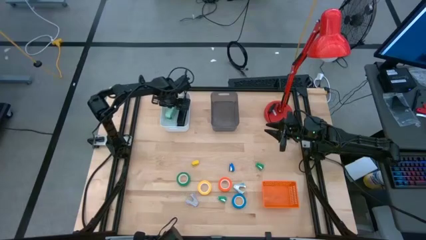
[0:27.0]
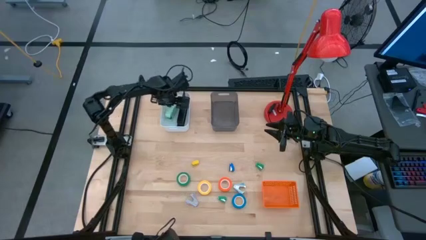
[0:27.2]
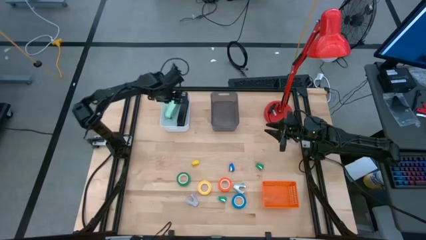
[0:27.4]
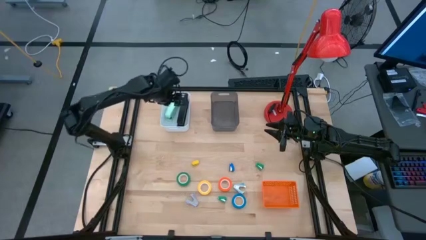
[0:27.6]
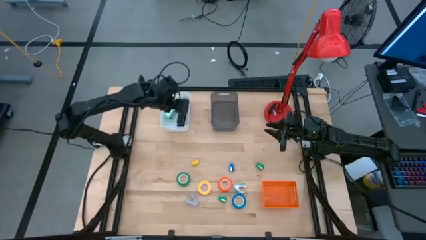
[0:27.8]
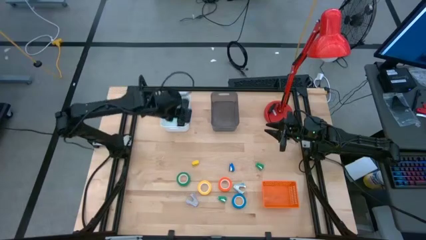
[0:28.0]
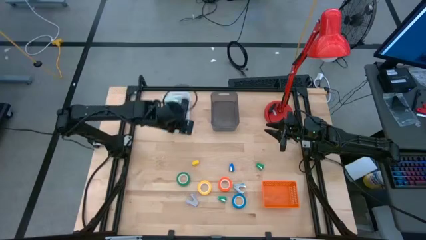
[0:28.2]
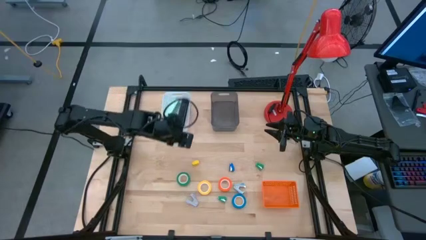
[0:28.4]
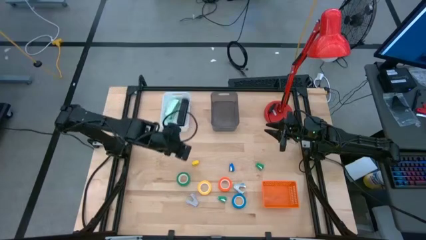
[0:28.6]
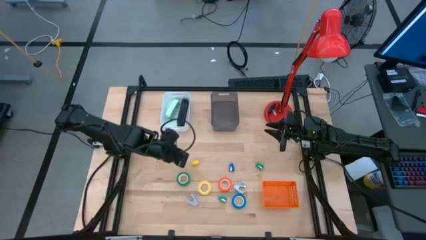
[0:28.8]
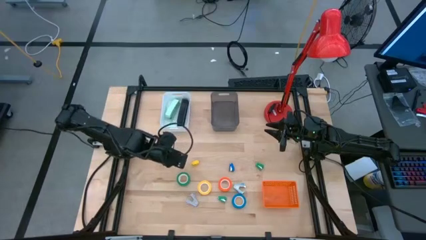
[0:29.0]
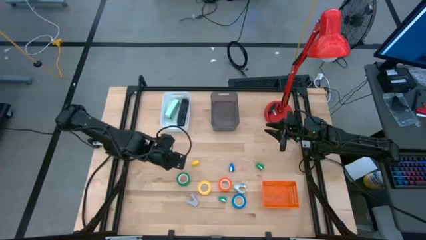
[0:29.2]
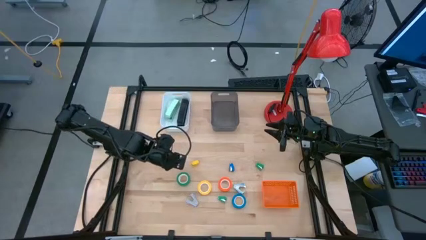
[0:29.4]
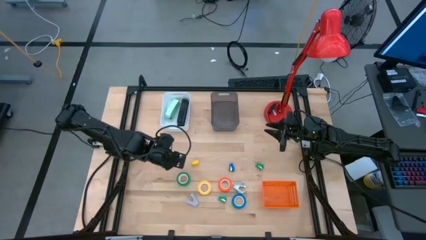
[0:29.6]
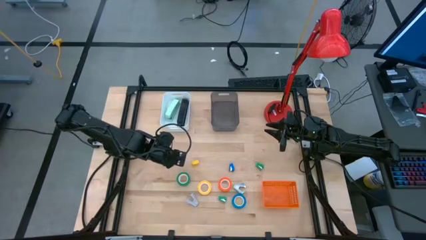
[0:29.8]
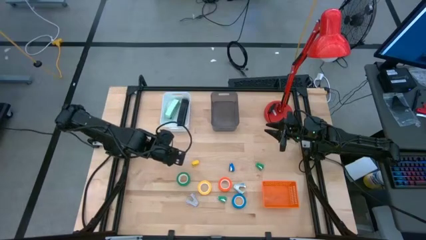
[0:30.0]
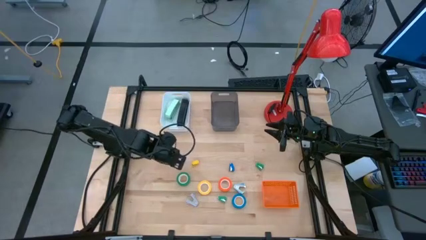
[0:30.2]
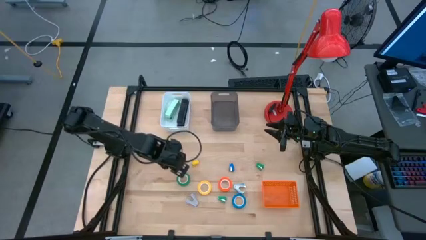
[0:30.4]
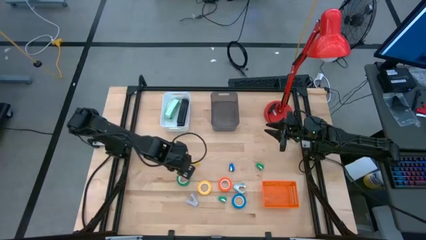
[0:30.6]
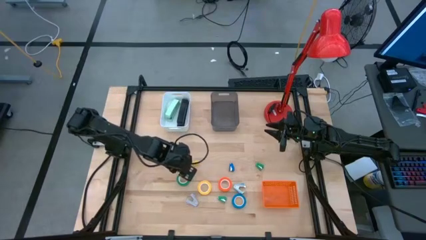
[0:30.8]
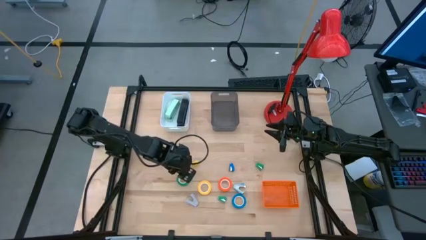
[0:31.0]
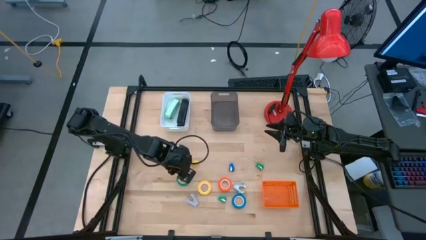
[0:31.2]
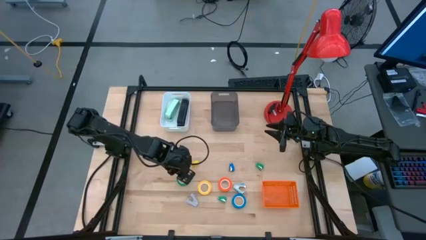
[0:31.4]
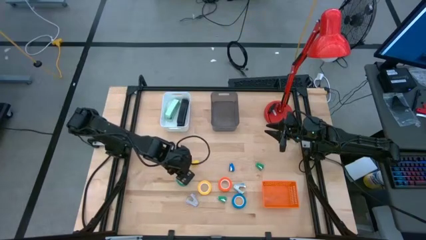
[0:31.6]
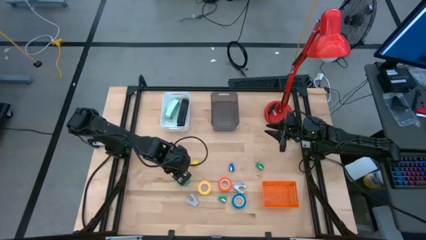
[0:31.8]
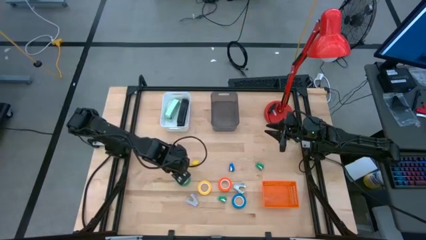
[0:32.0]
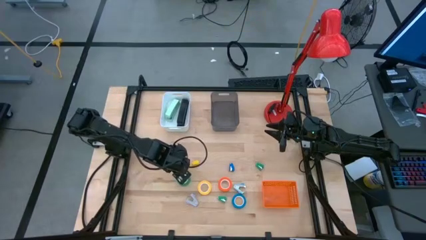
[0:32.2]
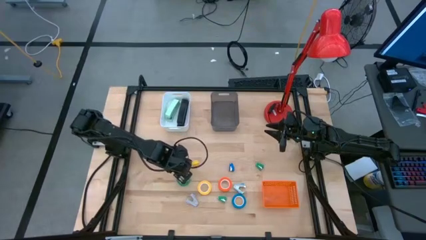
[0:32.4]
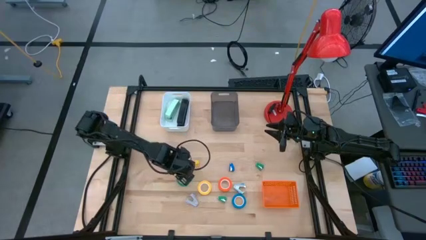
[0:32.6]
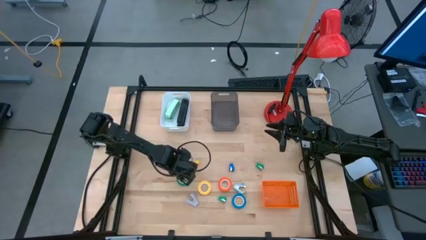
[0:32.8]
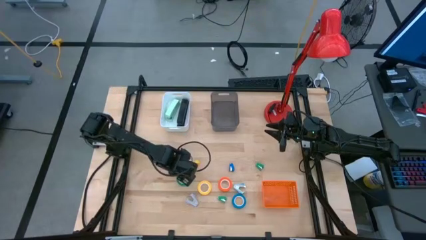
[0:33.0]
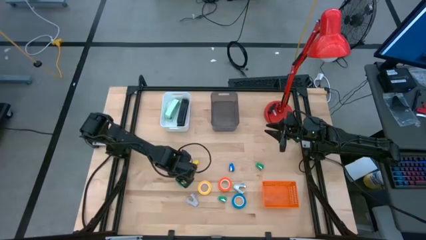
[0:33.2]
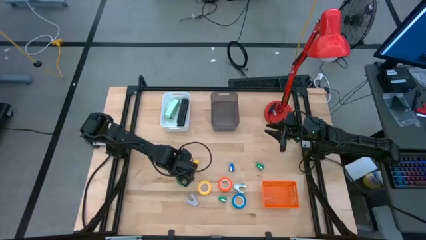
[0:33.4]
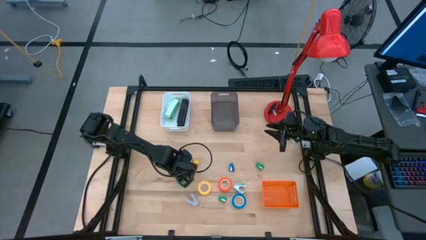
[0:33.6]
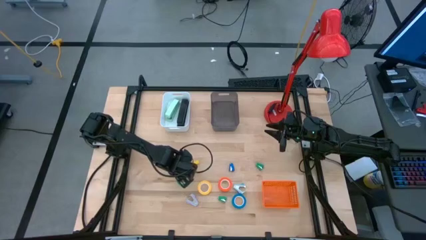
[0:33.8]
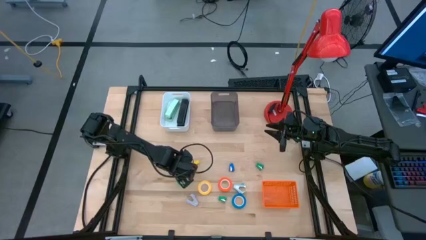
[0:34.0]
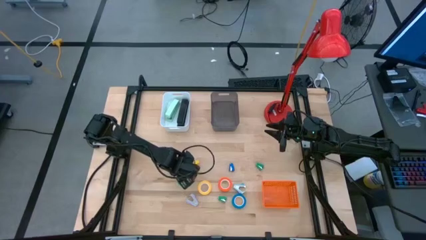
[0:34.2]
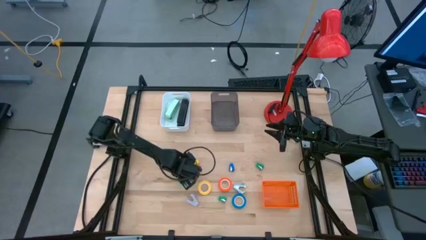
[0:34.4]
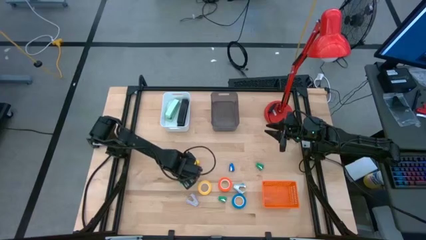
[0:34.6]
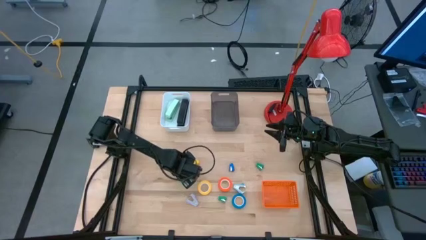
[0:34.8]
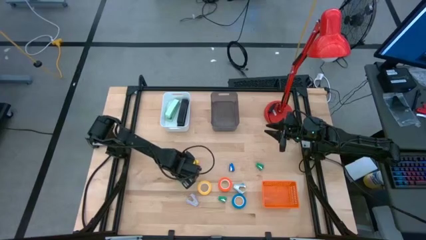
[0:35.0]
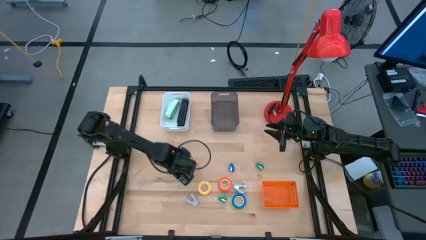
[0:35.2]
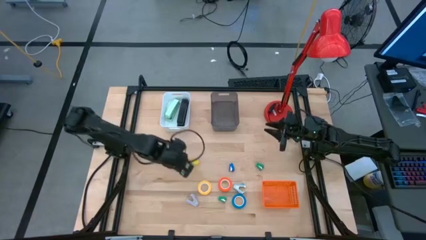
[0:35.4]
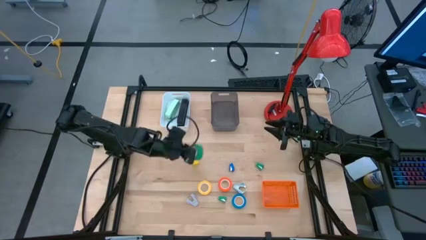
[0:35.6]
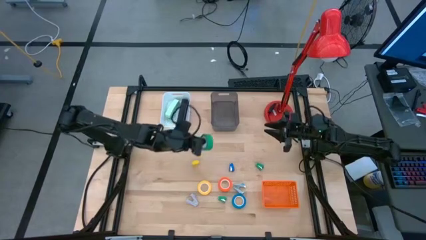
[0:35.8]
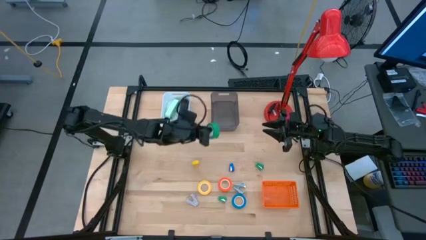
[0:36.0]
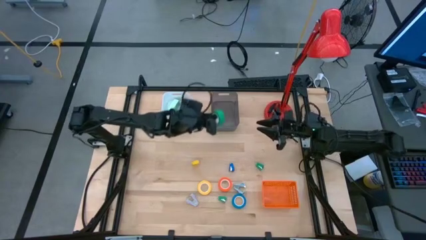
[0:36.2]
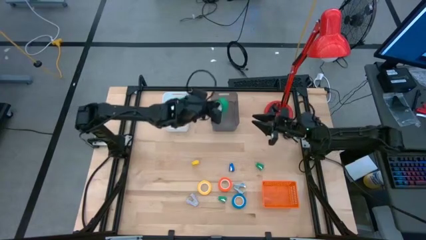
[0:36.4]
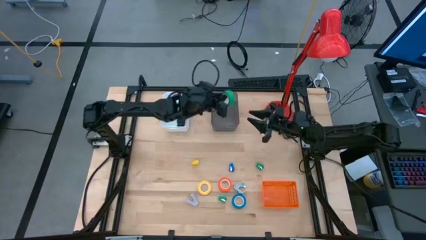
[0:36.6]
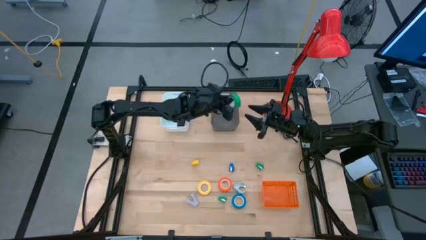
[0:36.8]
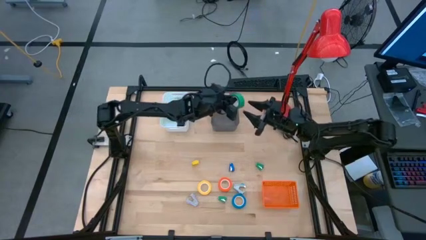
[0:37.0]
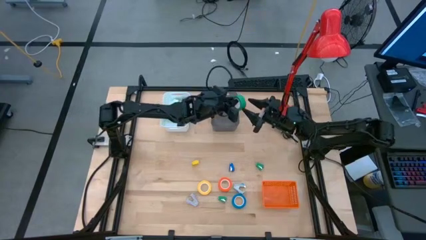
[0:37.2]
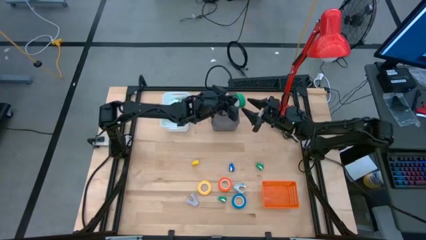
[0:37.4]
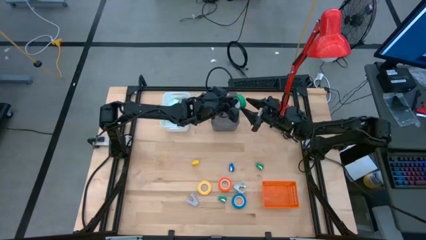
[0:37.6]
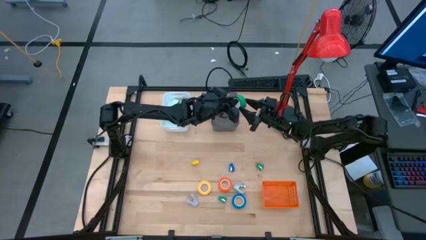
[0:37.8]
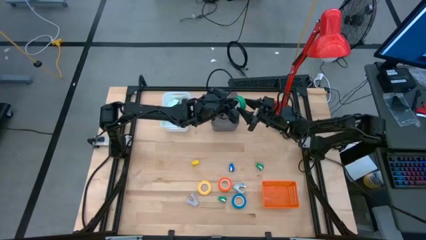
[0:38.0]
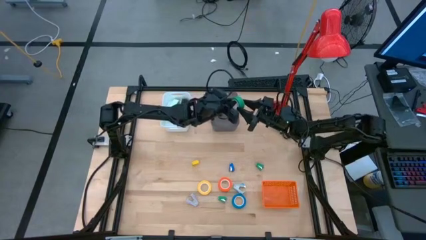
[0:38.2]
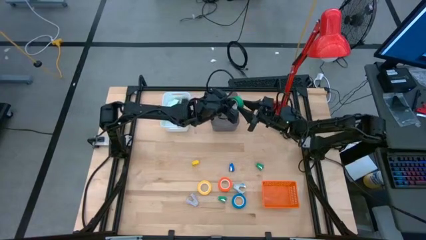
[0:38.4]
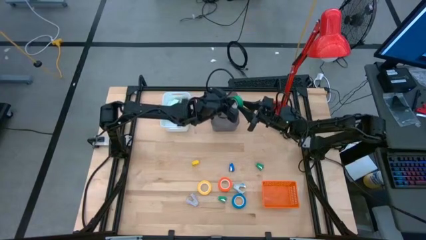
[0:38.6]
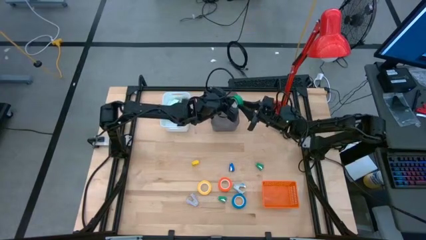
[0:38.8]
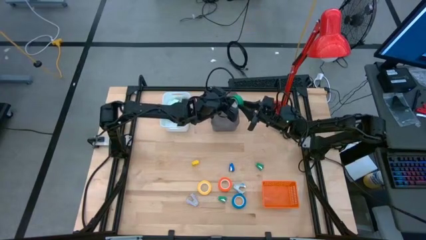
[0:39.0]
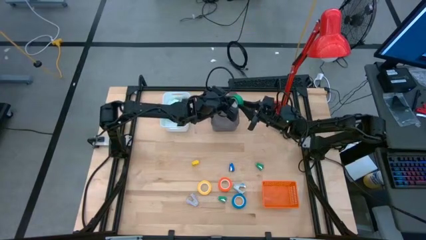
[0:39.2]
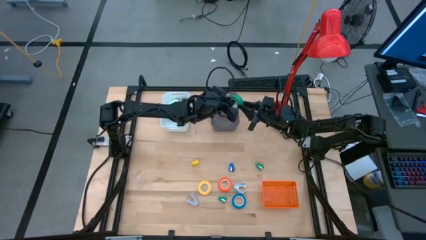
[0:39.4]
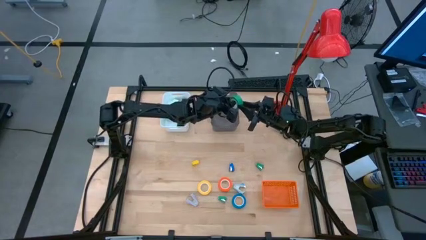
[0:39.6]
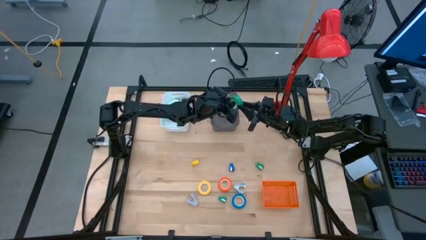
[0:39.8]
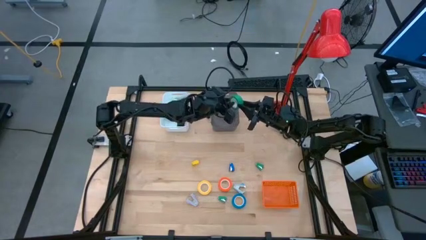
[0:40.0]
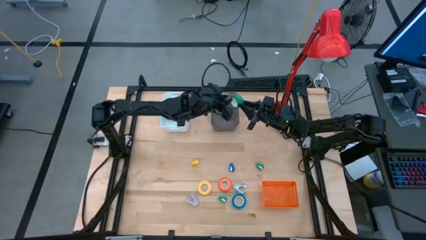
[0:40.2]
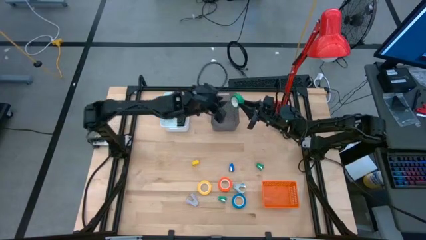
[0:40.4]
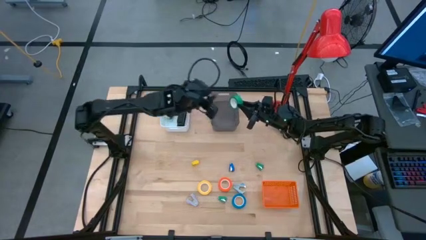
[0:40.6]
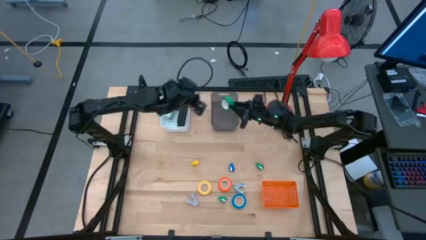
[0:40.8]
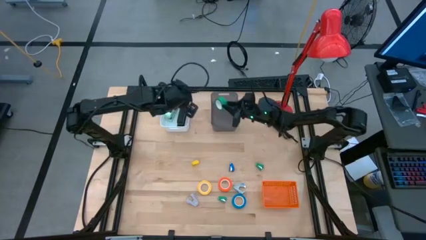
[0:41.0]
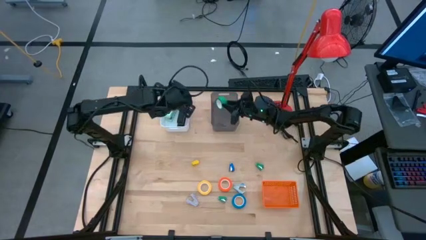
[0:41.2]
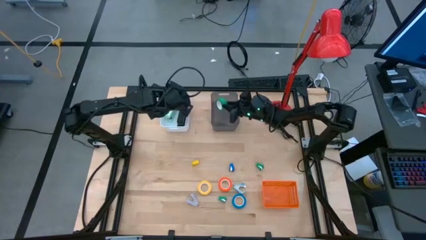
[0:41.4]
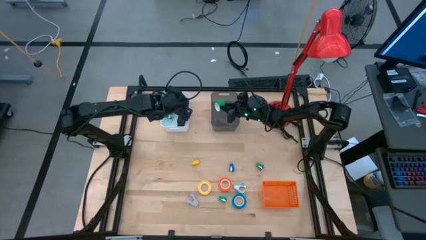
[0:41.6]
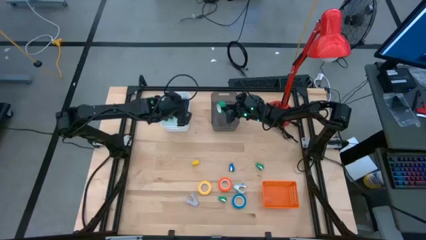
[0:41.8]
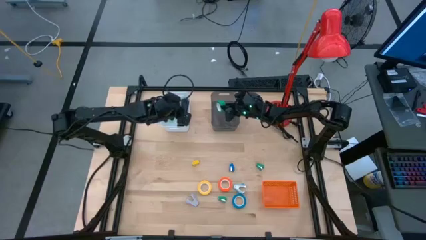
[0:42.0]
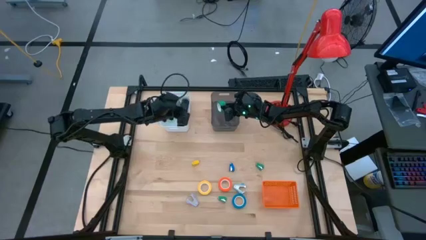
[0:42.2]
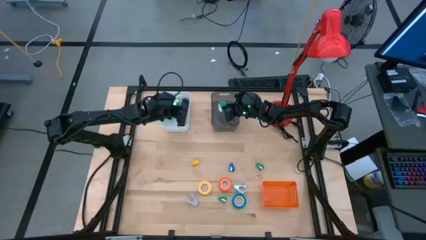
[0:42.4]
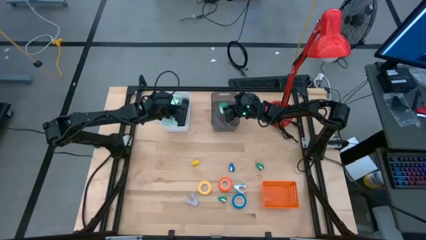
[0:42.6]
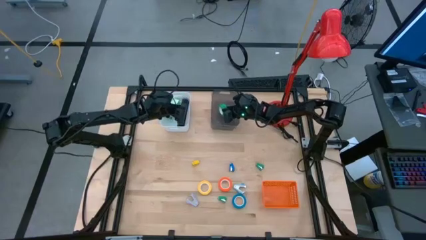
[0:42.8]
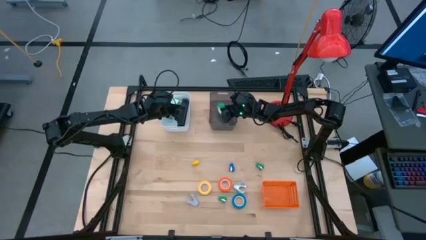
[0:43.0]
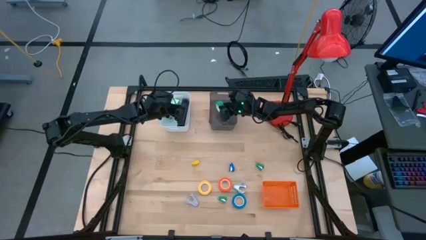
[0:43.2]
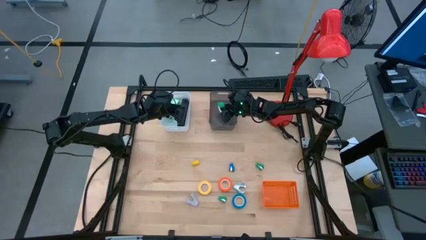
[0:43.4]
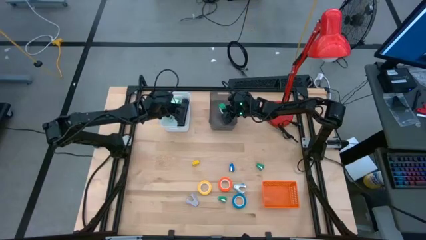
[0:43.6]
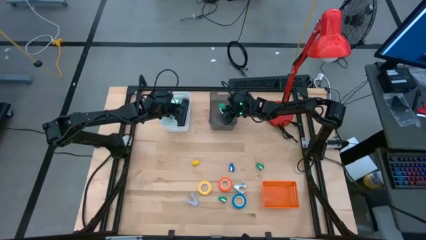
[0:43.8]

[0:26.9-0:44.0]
Task: Pick and place Stapler, Stapler remover, tape
Put the green tape into the black bin
